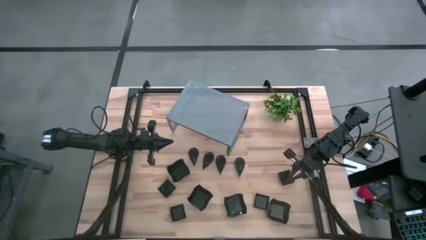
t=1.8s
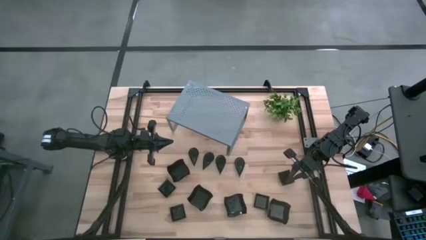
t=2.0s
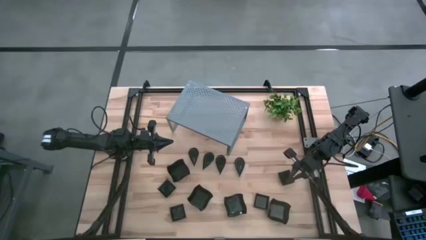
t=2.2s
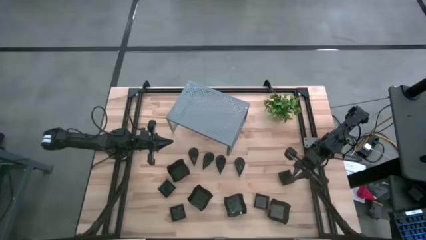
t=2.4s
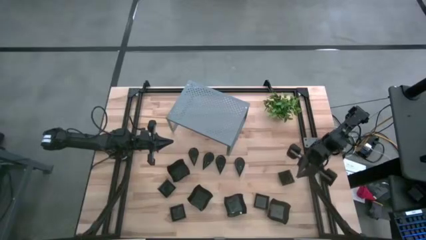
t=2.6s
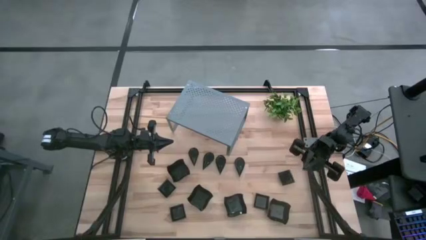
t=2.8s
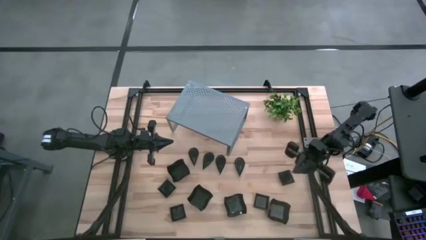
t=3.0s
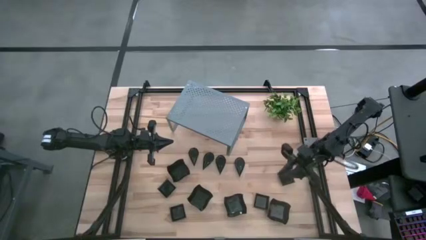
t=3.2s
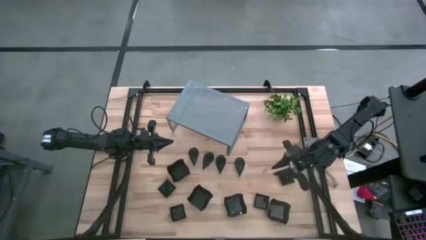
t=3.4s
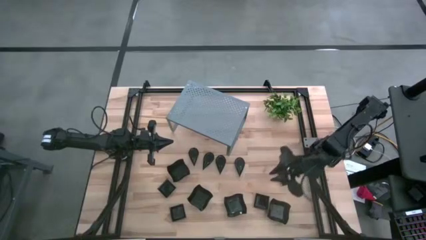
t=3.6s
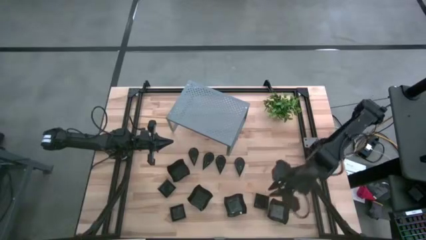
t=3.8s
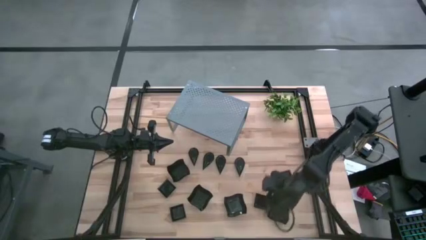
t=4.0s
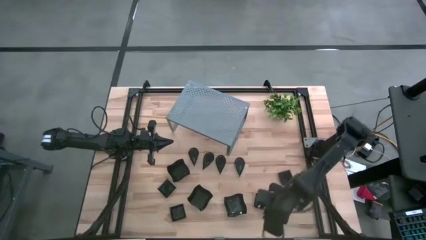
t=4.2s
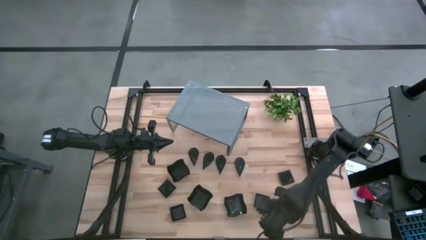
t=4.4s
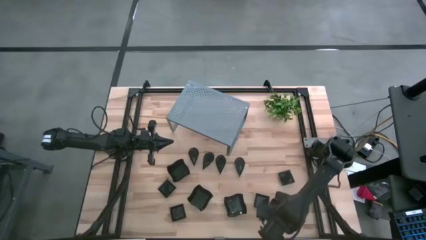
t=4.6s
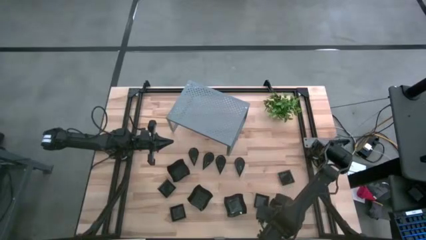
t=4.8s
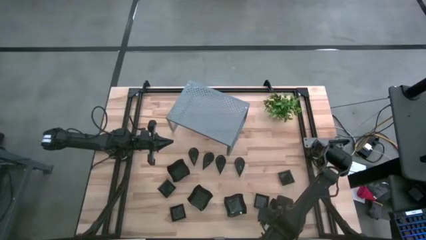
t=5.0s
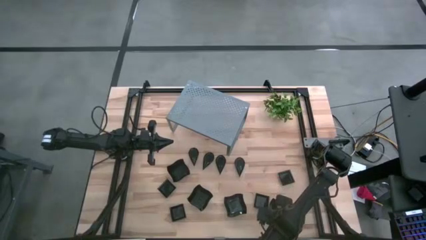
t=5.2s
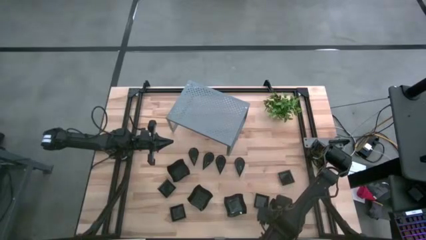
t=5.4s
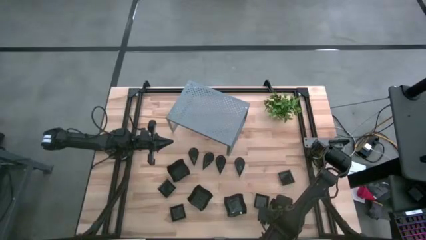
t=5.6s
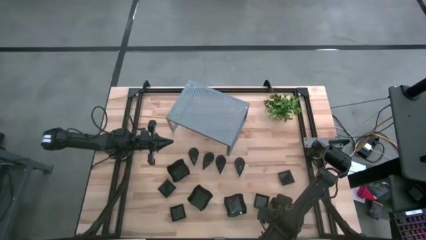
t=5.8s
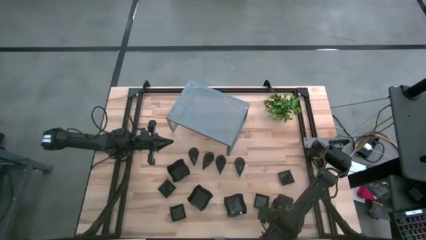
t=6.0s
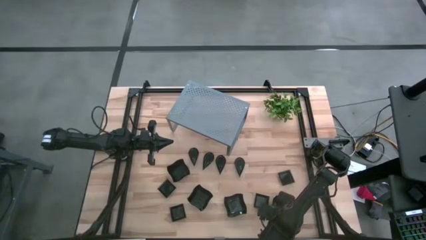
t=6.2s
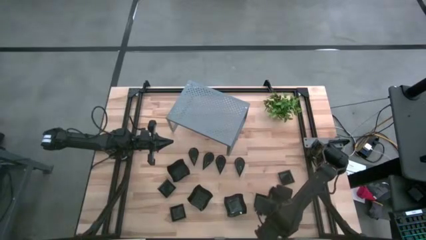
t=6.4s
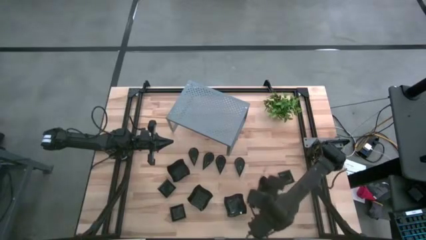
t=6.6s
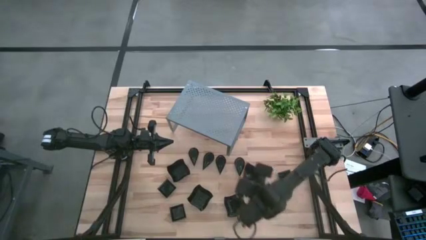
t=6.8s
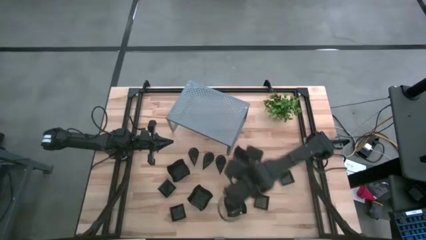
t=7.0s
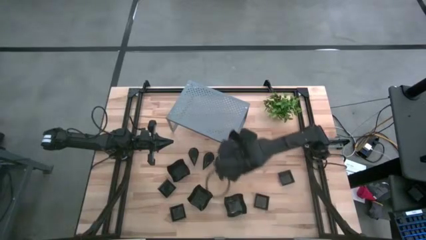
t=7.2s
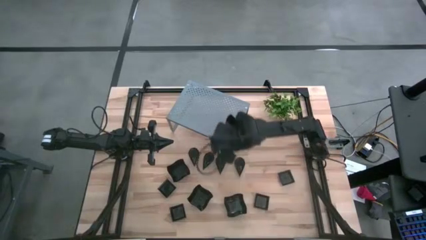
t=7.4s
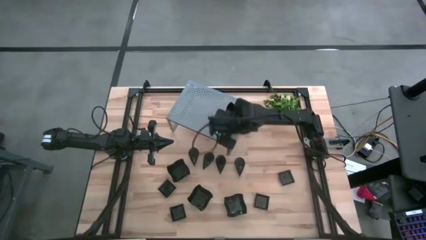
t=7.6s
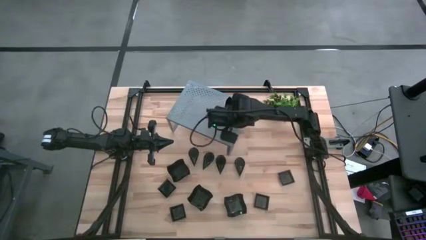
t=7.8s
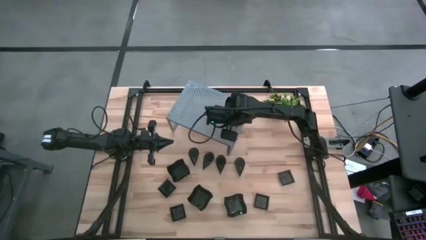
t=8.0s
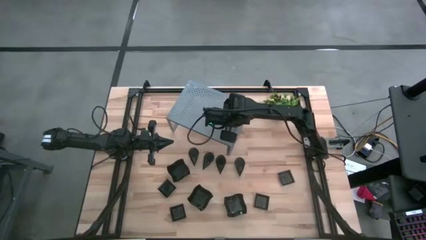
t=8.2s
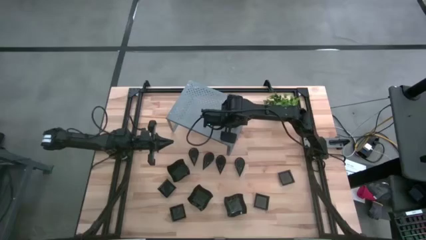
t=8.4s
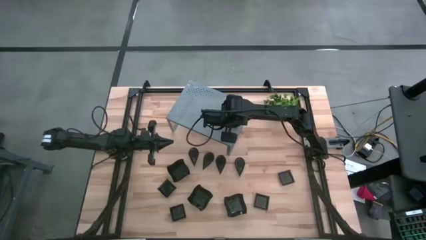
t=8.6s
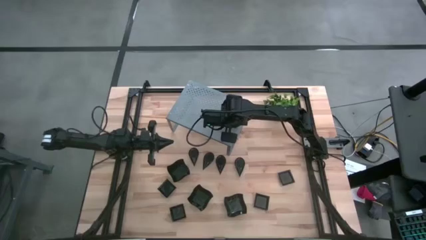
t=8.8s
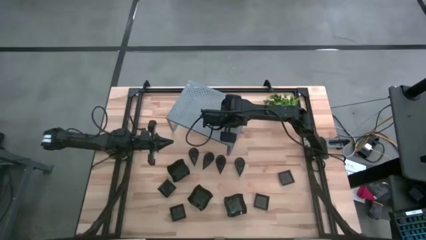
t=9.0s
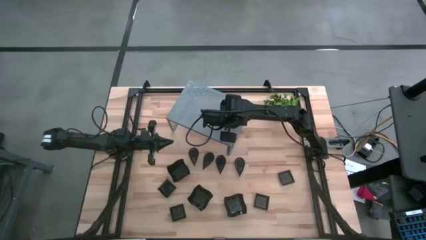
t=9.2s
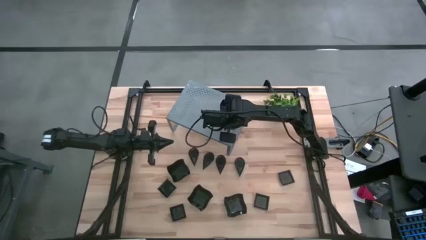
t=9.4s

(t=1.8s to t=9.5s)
Task: Pick & Place Mini shaped plates
Put the right distorted square plate on the shelf

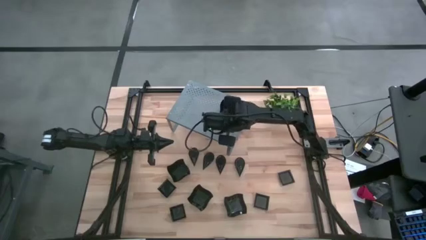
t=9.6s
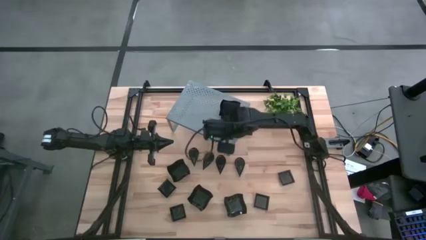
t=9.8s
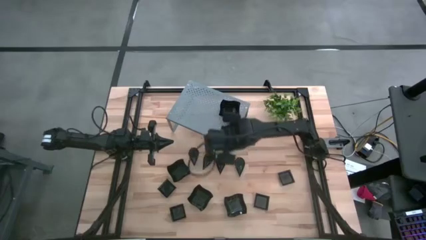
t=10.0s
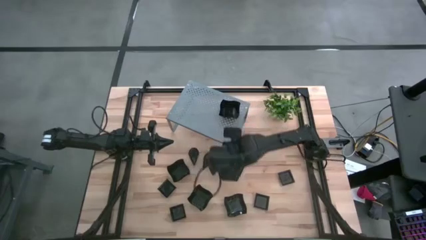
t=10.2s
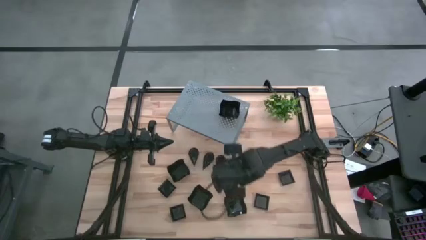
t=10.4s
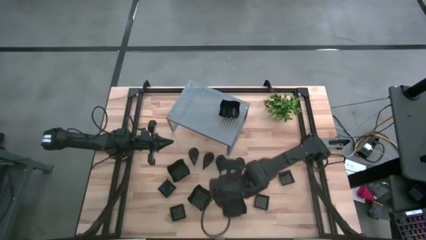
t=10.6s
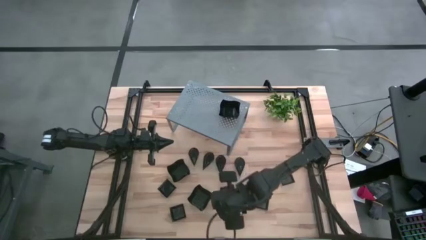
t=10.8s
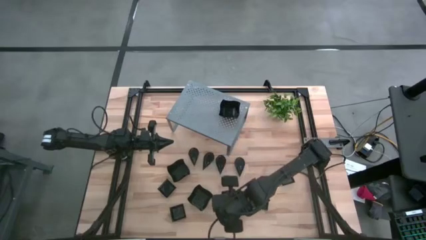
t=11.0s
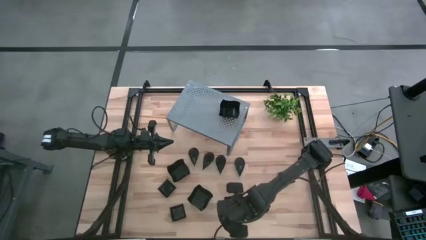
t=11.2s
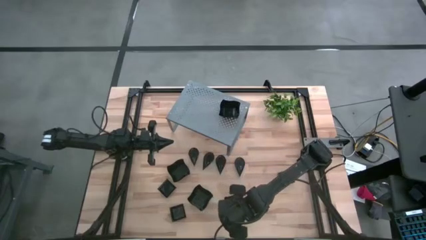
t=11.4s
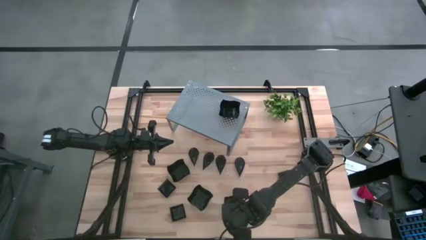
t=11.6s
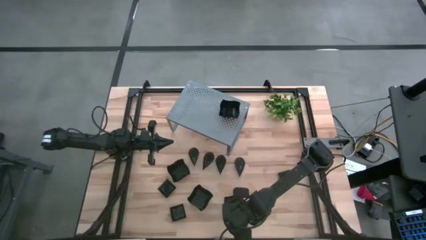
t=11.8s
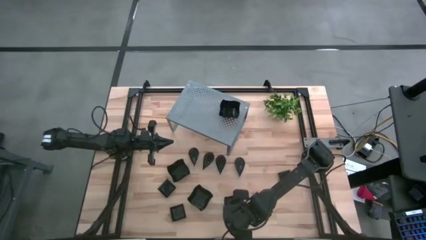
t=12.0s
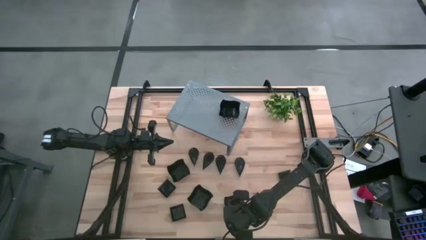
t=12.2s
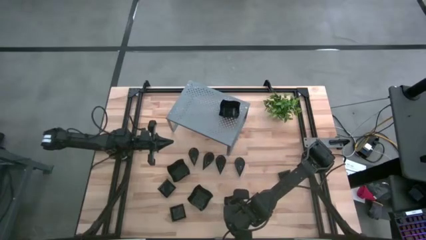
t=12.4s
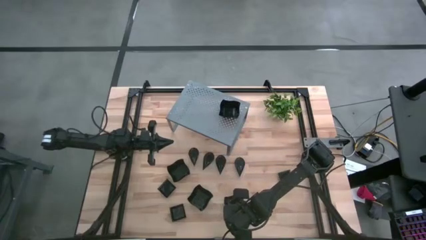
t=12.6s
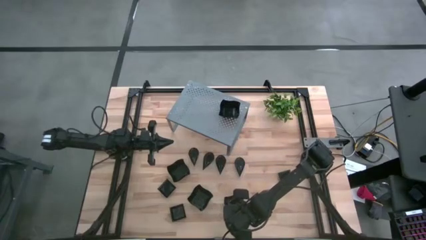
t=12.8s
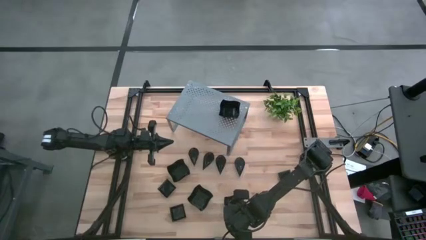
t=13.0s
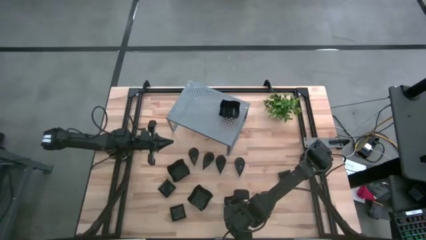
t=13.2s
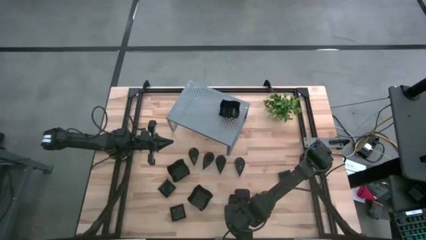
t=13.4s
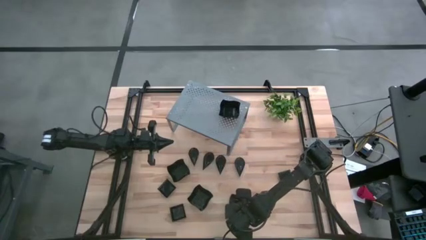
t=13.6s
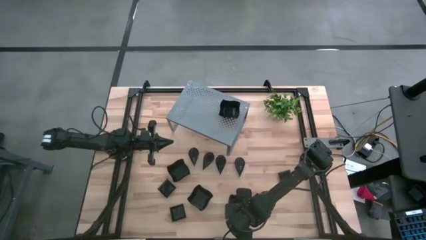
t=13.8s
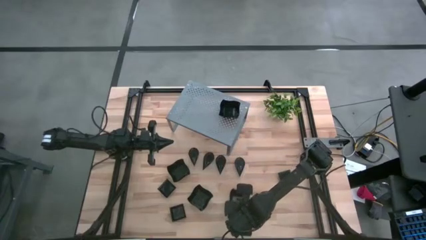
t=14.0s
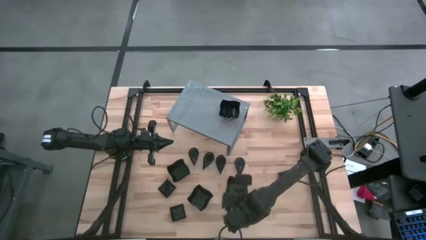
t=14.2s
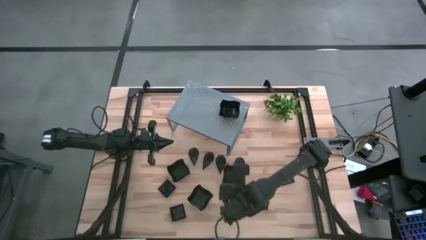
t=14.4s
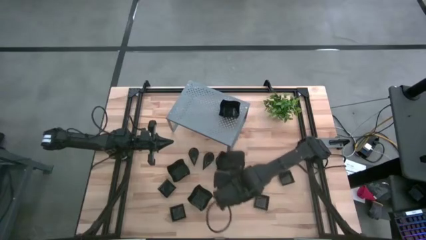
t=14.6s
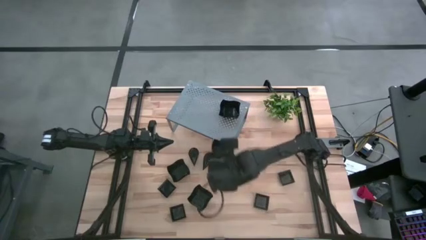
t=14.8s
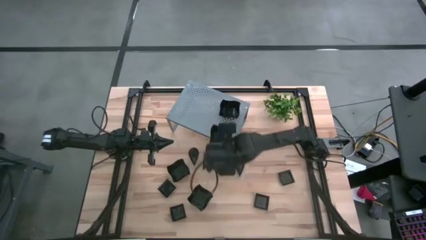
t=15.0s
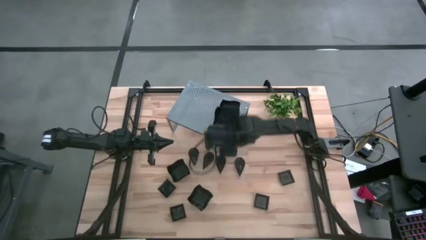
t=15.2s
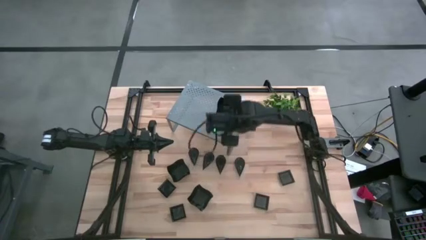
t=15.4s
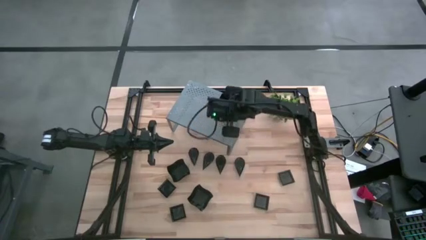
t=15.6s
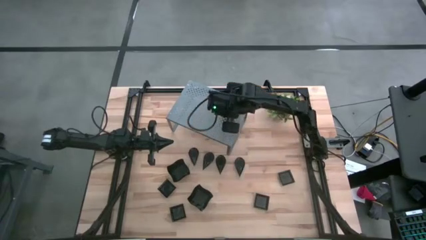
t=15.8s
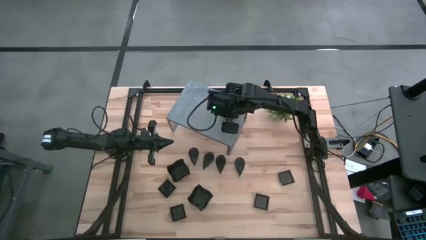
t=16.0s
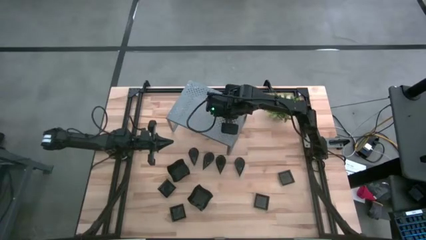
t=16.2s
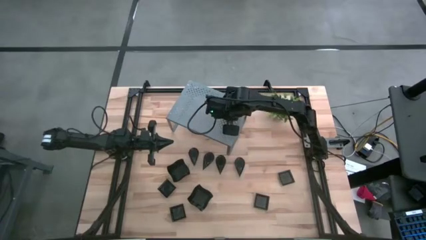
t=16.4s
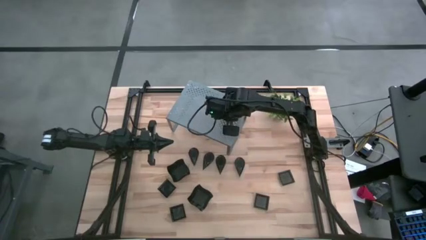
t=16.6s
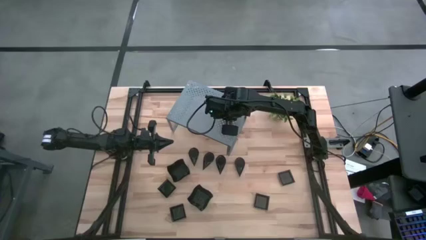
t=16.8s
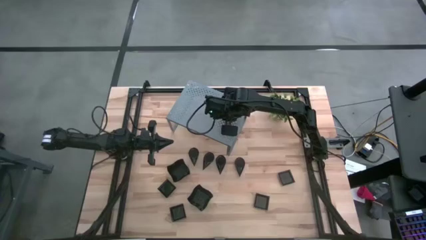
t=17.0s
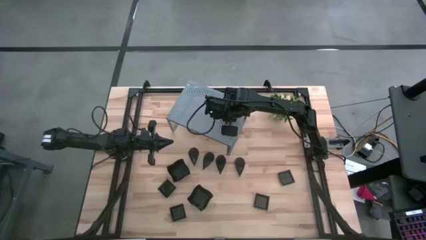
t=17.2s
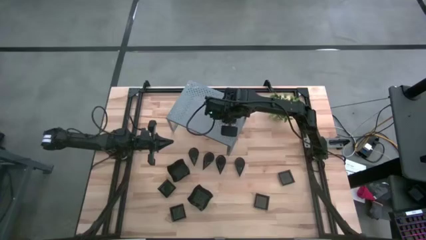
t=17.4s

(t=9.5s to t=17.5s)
Stack the right distorted square plate into the distorted square plate on the shelf

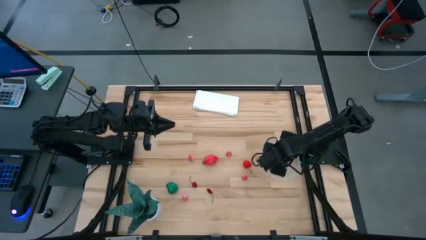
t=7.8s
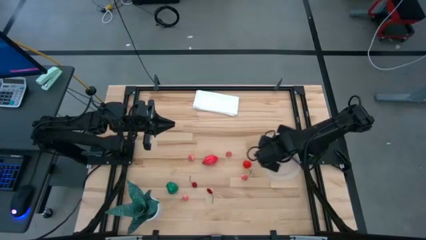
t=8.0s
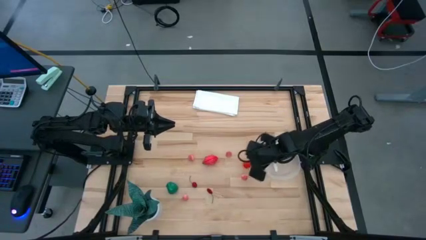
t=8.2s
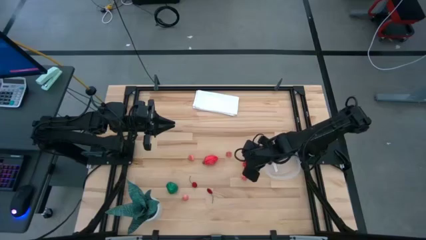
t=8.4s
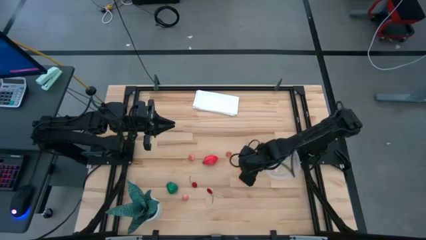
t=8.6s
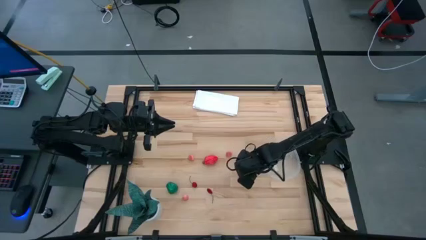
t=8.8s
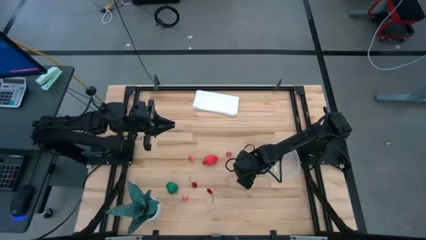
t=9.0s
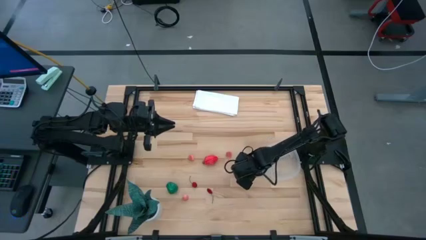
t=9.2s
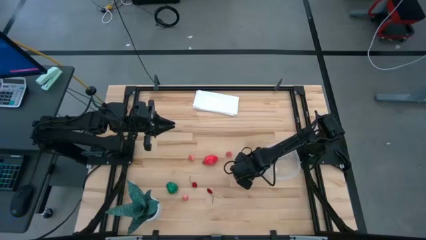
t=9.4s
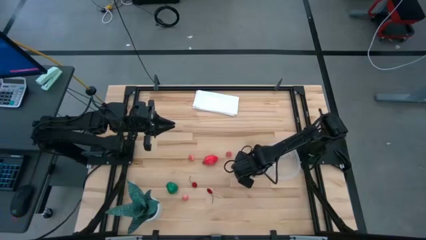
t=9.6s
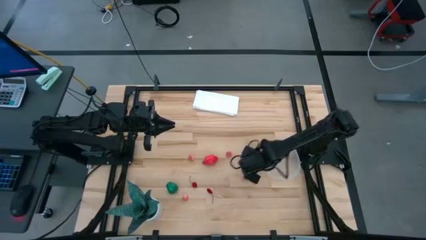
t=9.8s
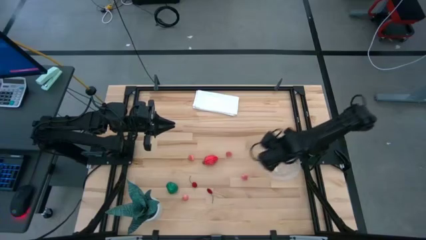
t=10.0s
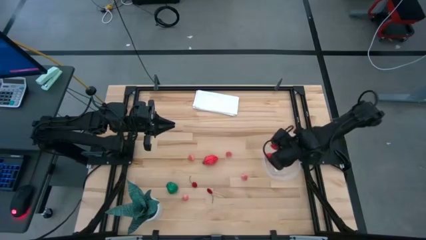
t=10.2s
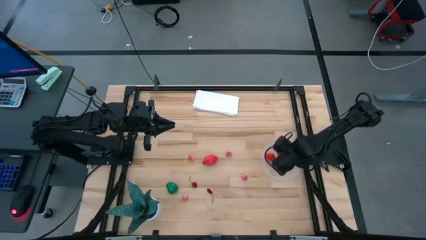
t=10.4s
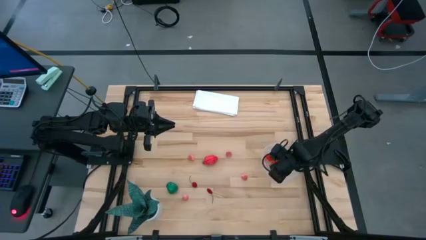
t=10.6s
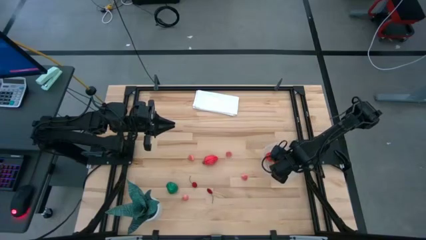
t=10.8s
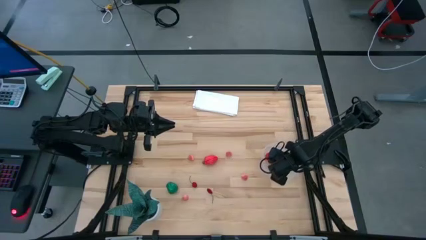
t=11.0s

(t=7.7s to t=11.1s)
Task: Pick and placing Produce into tupperware
Put the red strawberry into the transparent bin
